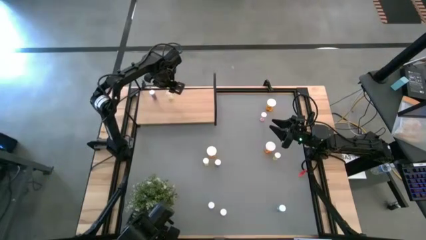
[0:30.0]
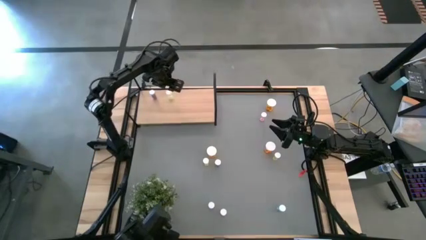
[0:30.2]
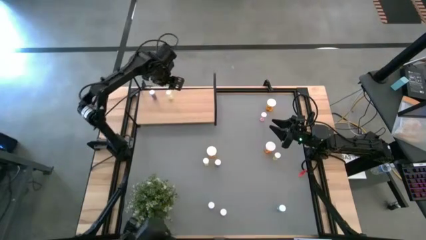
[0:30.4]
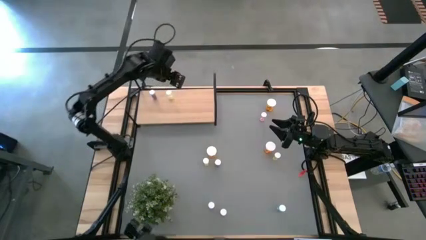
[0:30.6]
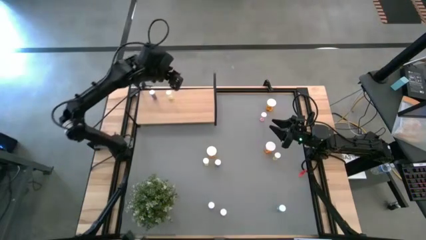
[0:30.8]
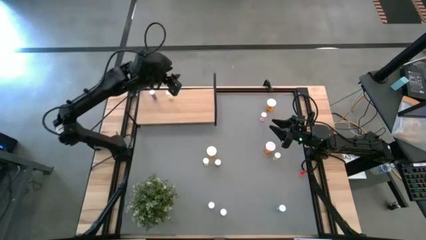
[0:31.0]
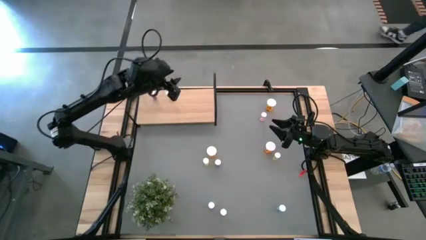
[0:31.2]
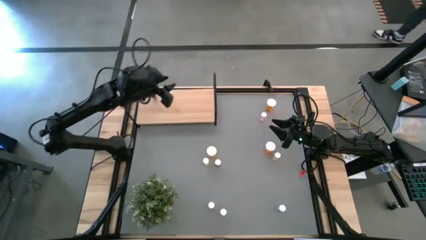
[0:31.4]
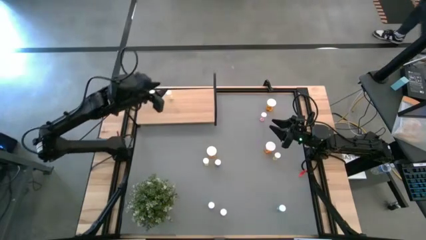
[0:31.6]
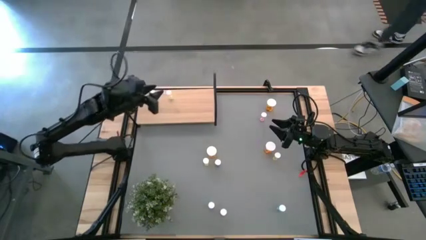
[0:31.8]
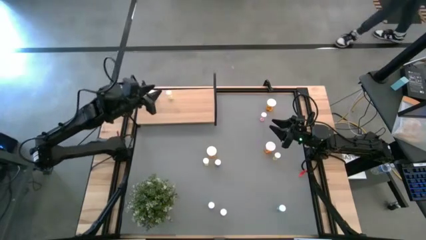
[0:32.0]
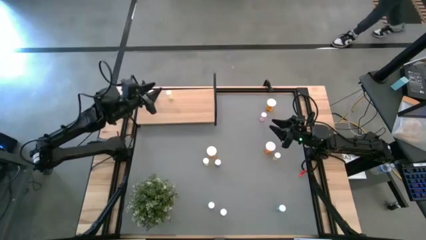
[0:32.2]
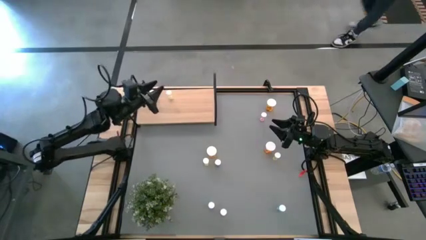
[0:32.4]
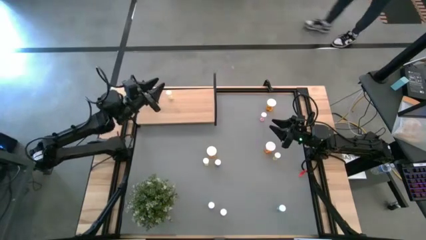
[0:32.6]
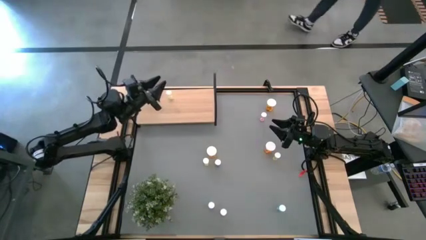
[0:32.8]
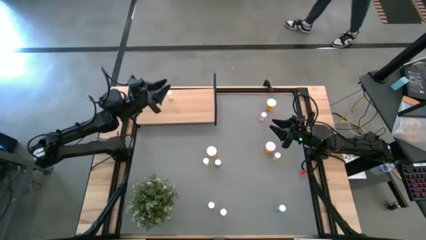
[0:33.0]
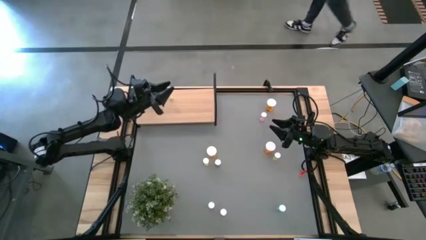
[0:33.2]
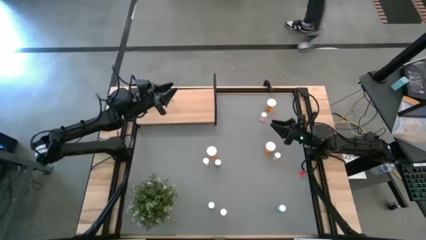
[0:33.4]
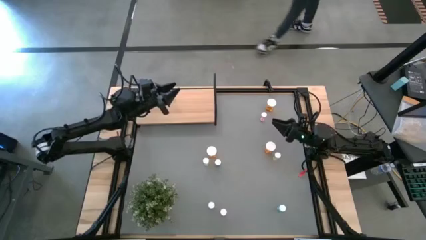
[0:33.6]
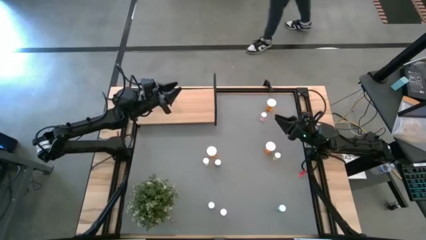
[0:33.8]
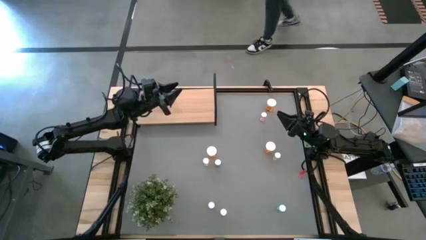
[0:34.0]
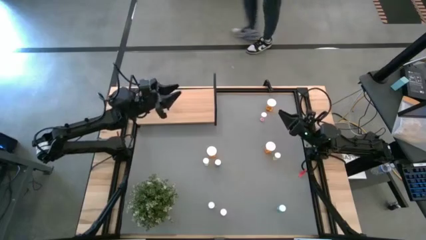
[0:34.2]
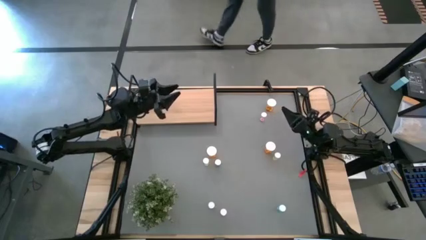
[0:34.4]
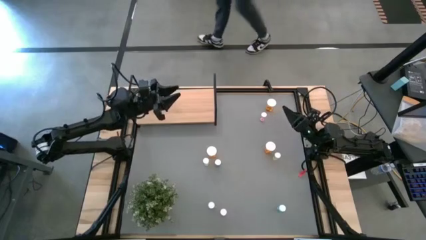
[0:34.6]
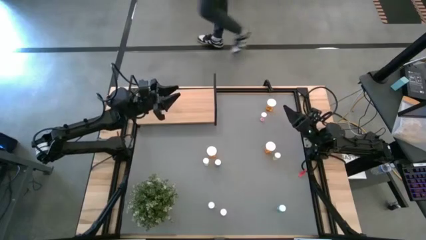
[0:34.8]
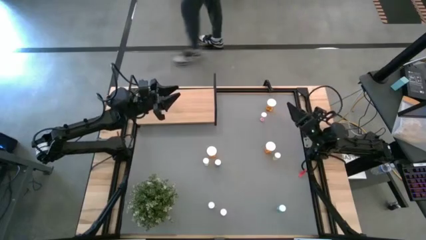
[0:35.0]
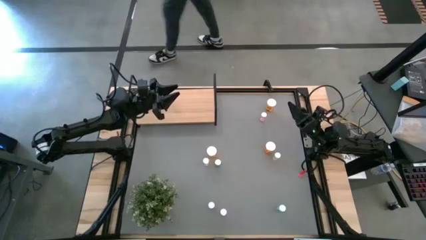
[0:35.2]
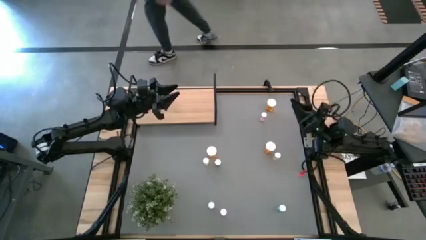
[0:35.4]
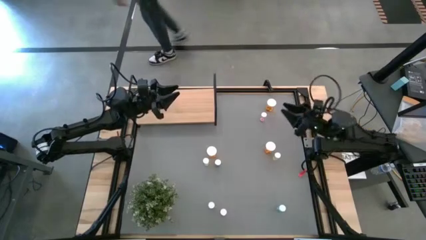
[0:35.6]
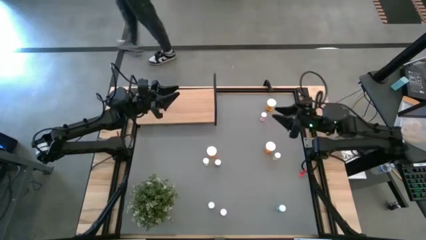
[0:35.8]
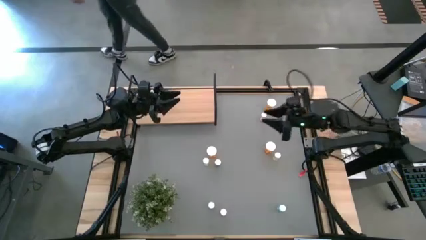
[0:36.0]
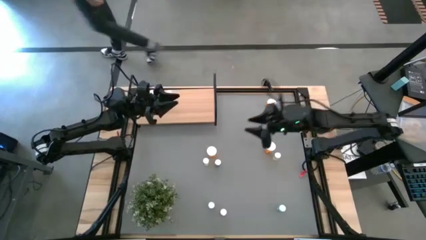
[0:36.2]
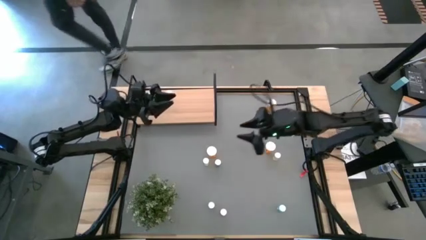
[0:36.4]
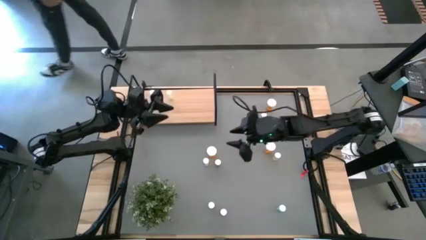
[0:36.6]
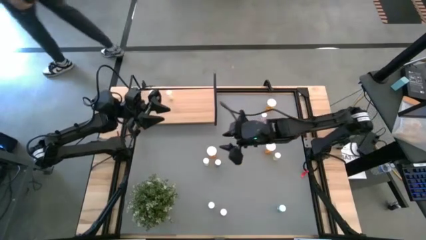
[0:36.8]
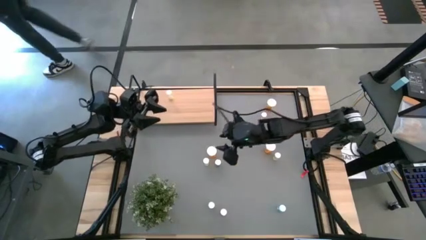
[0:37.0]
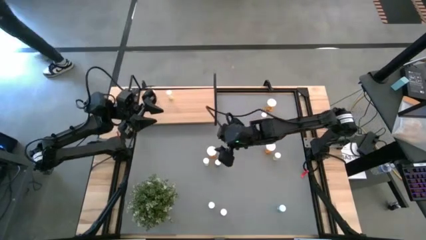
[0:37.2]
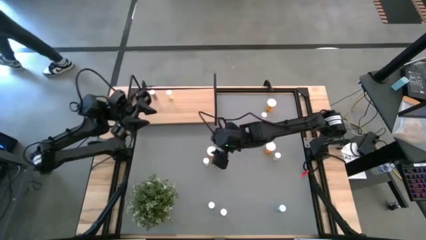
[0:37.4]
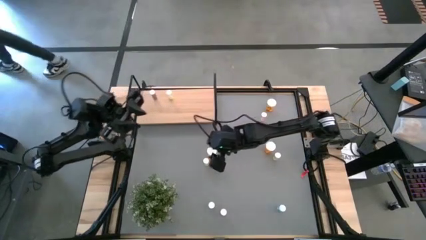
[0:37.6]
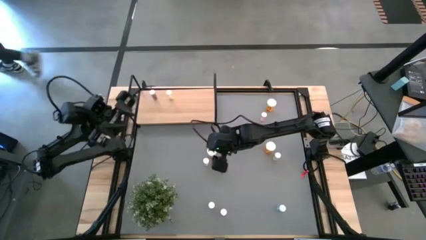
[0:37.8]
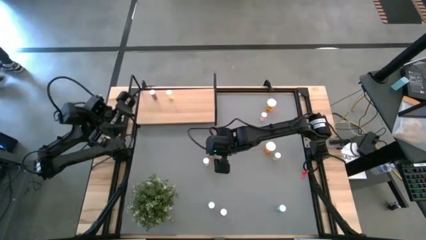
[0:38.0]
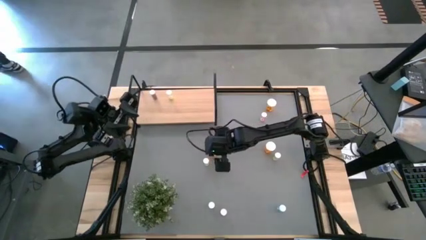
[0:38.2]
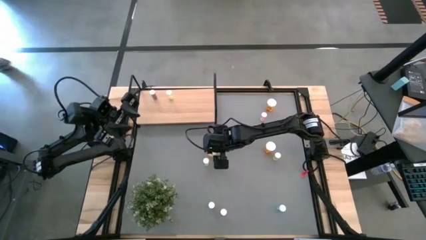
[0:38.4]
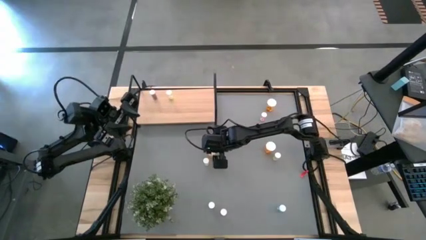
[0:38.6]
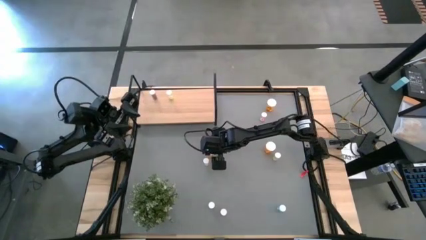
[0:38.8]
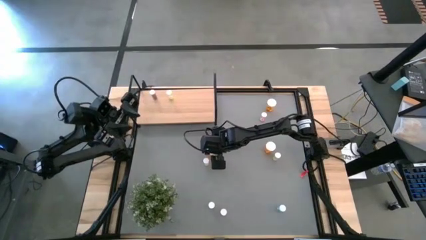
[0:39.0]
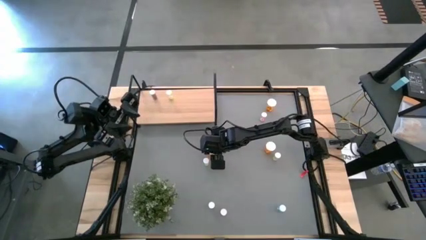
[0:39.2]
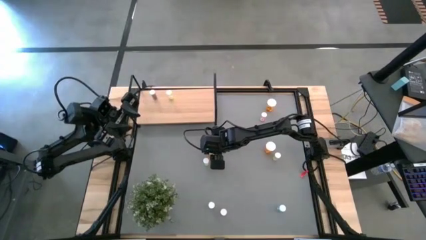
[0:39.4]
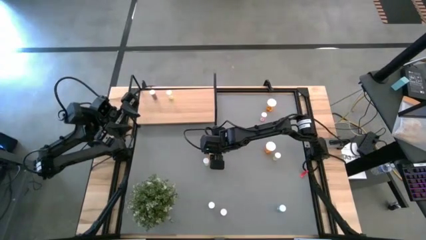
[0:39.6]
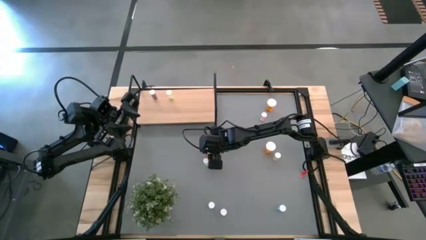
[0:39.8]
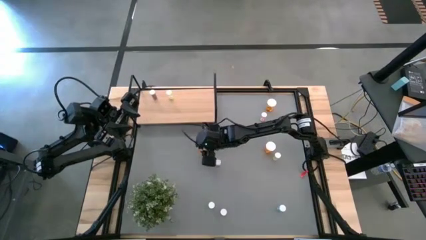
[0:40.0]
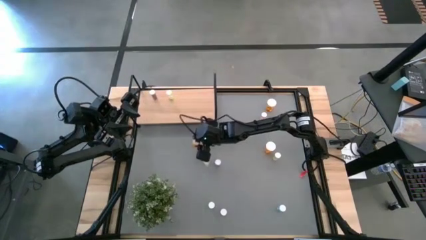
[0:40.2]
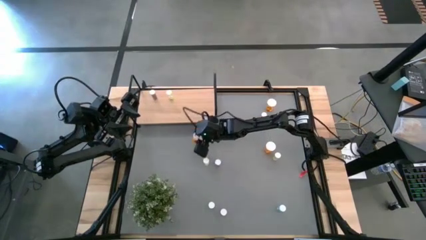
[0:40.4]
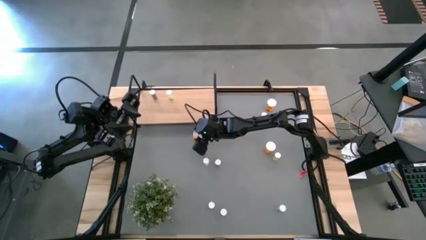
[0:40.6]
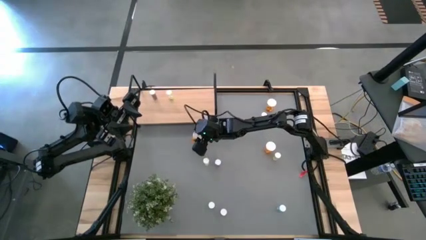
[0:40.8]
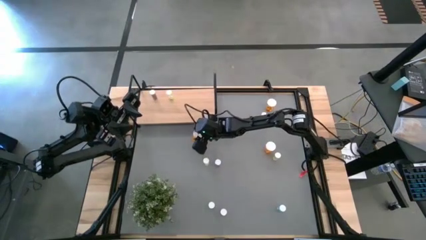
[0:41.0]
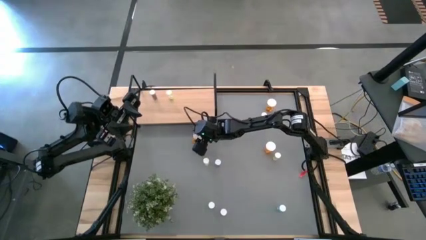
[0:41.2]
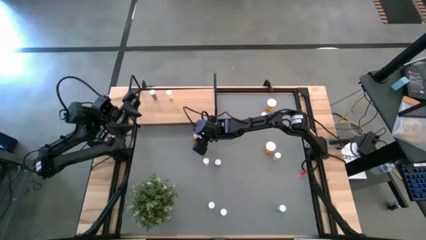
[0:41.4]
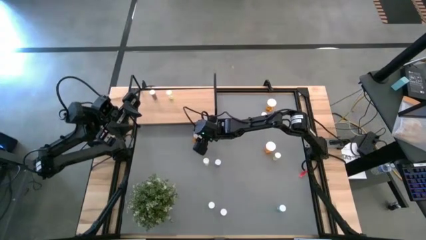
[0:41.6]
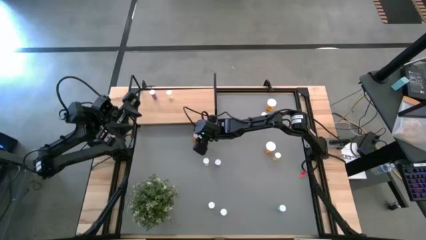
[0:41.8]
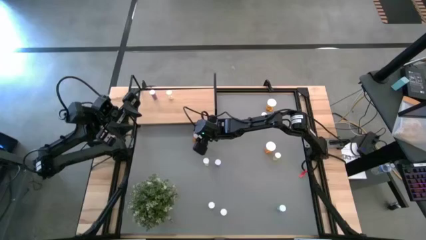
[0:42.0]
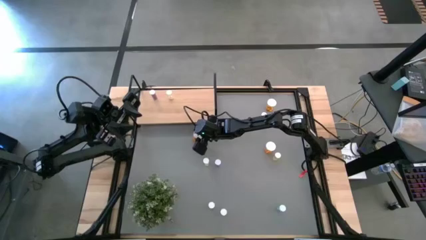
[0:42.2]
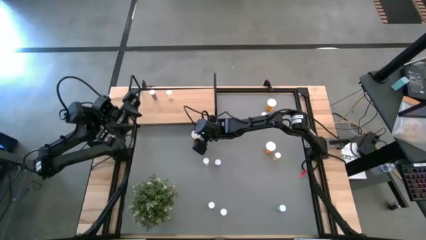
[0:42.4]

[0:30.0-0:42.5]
Task: Pick and place medicine bottles onto shelf by color
Move the bottom left orange pill bottle to the middle of the table

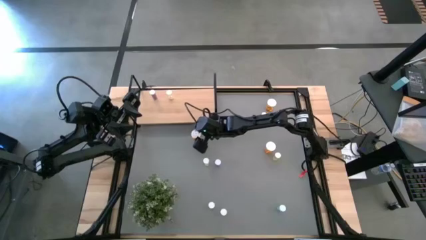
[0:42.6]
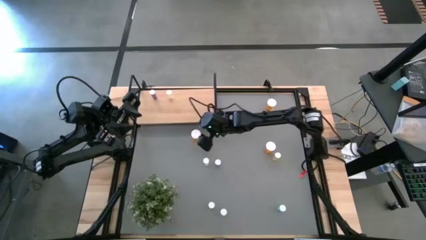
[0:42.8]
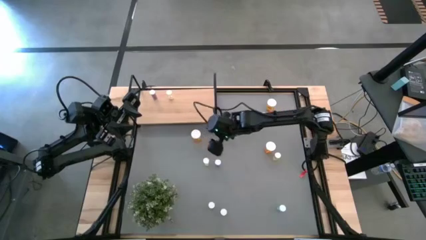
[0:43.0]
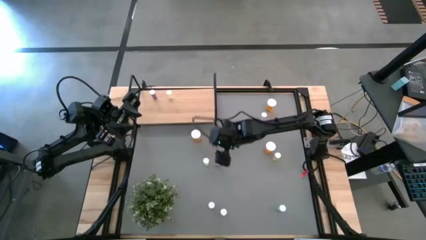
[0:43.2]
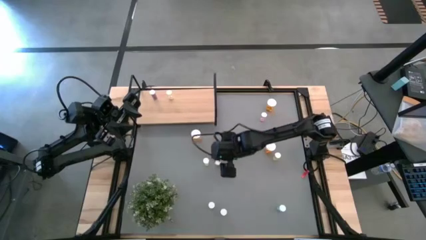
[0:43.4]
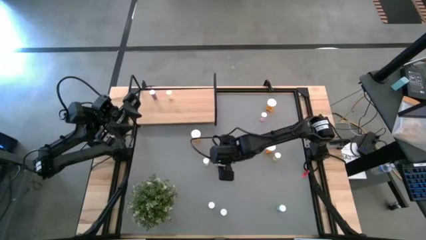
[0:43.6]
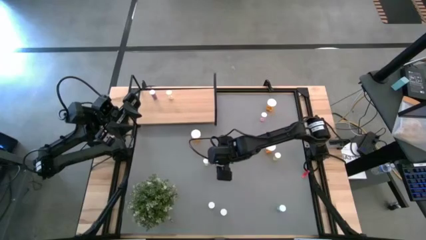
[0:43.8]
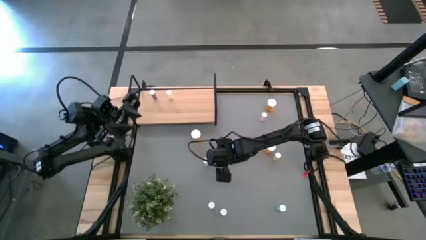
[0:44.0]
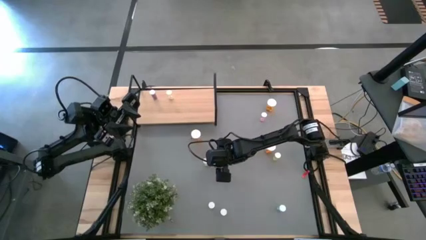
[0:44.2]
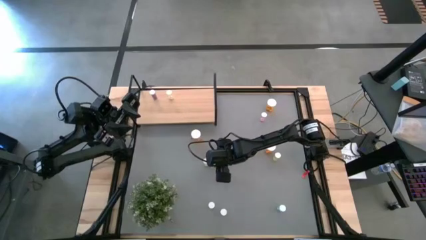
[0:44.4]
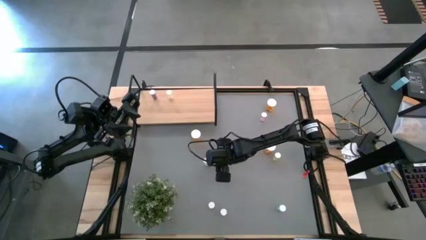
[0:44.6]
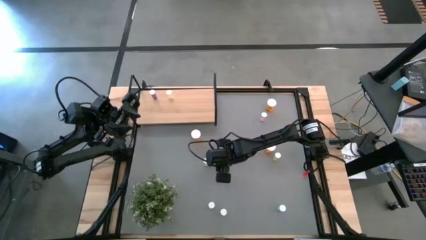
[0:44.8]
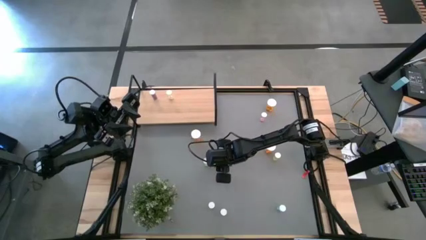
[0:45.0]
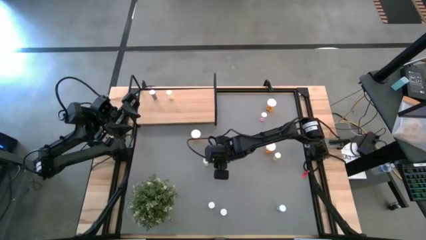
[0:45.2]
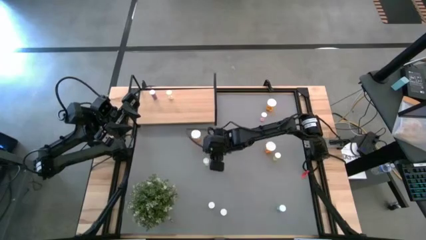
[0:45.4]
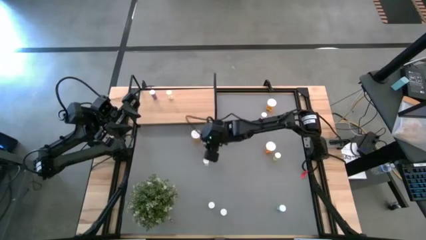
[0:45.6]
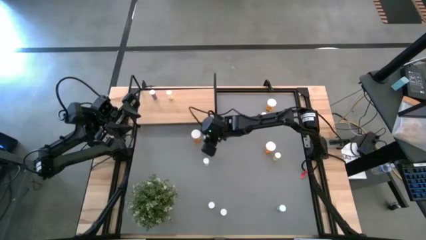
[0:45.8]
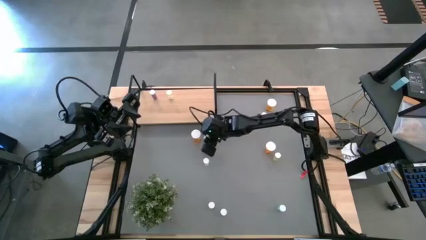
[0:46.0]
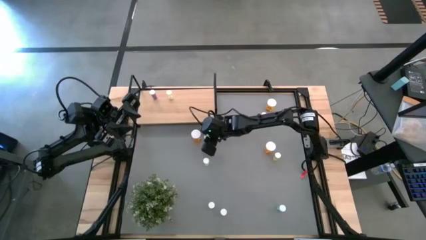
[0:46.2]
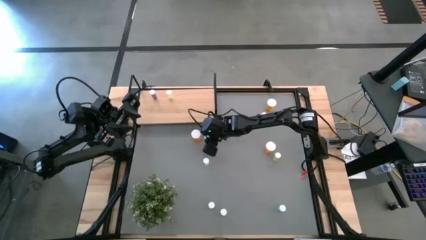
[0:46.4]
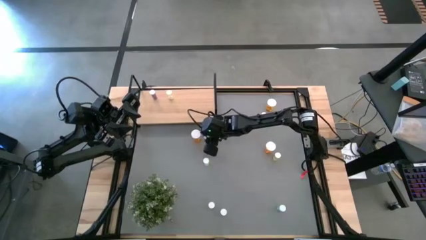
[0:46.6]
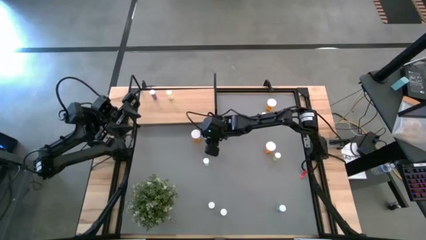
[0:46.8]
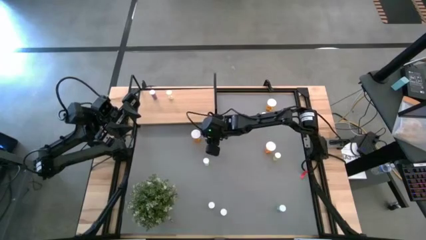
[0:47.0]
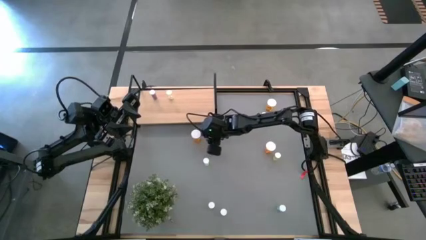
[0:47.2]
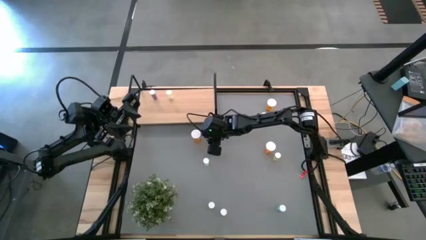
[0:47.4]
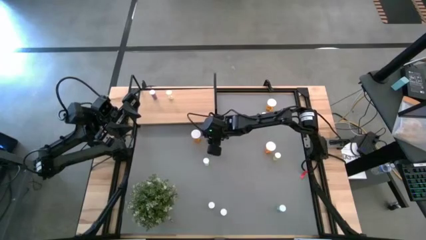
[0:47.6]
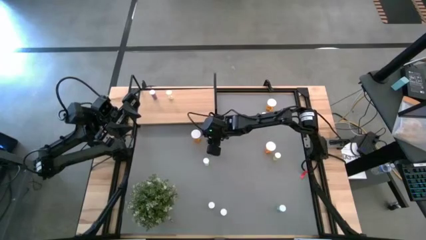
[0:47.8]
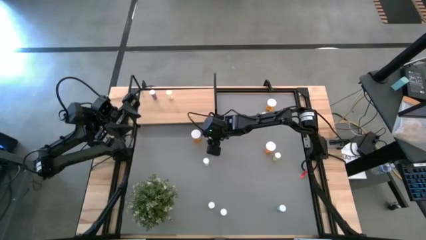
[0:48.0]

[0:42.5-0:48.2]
Move the top blue pill bottle to the middle of the table
